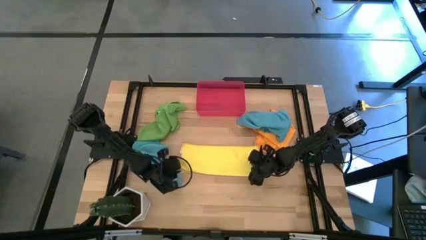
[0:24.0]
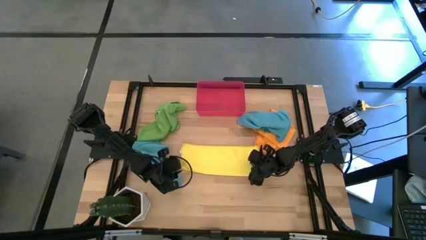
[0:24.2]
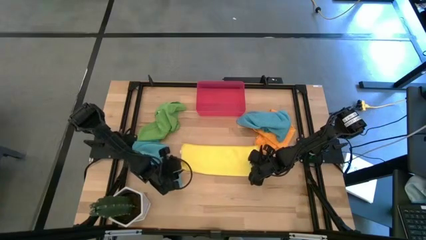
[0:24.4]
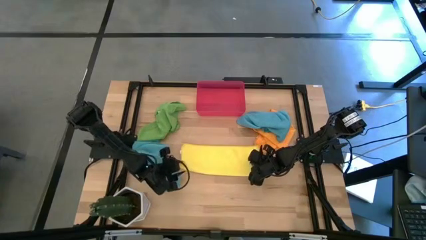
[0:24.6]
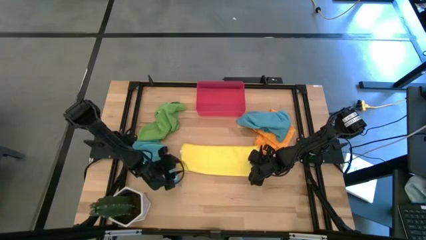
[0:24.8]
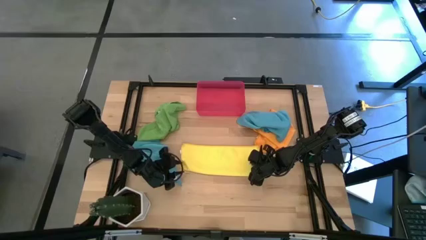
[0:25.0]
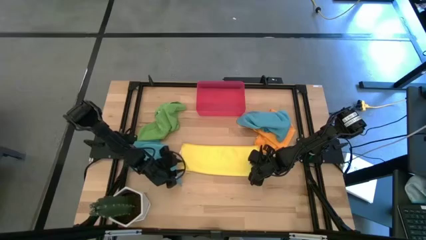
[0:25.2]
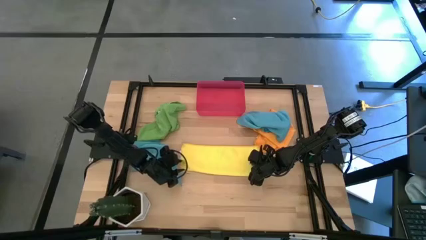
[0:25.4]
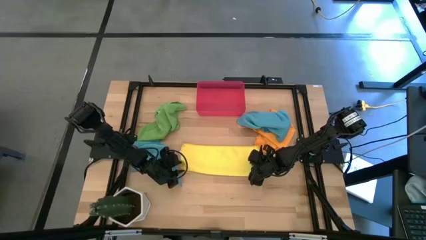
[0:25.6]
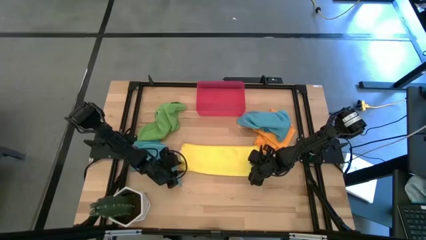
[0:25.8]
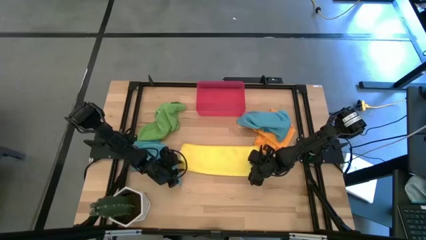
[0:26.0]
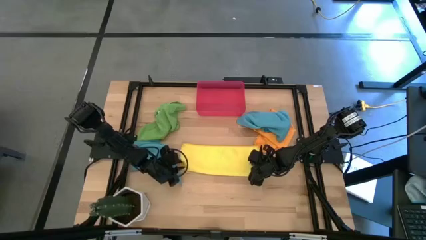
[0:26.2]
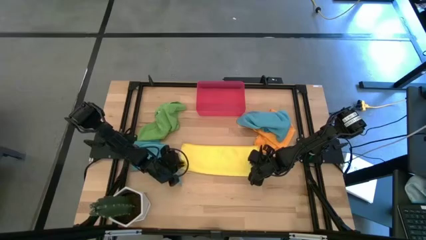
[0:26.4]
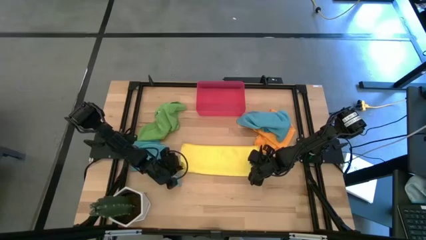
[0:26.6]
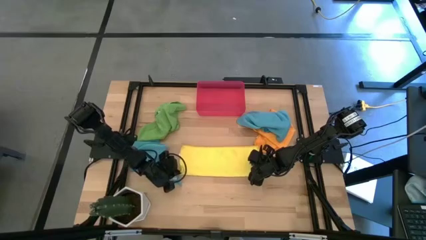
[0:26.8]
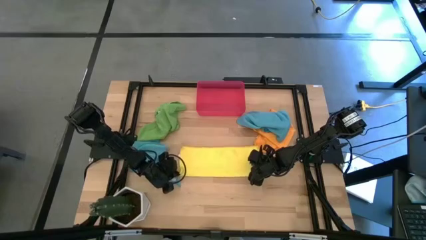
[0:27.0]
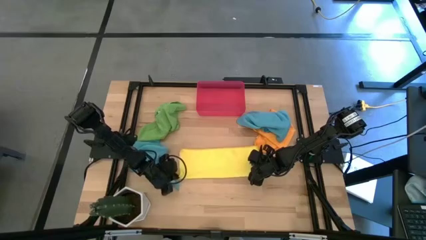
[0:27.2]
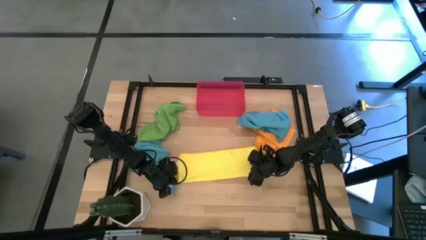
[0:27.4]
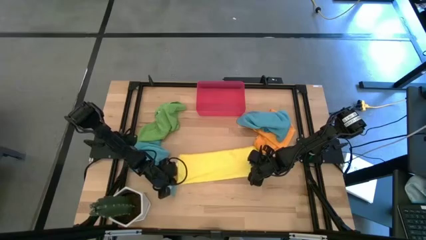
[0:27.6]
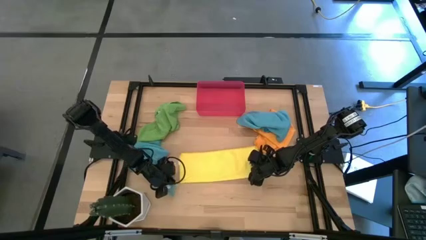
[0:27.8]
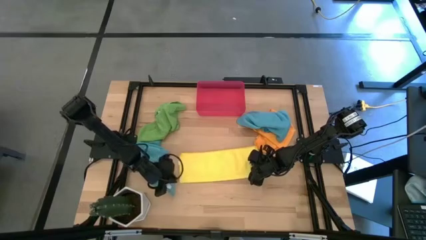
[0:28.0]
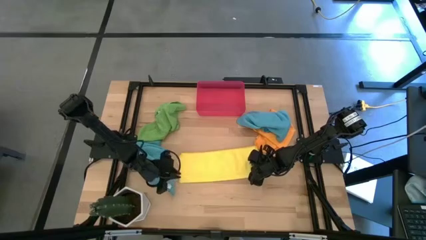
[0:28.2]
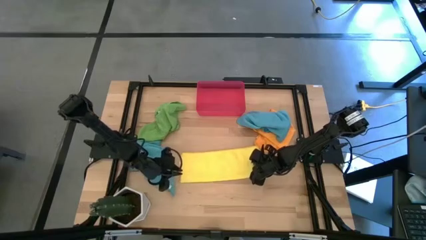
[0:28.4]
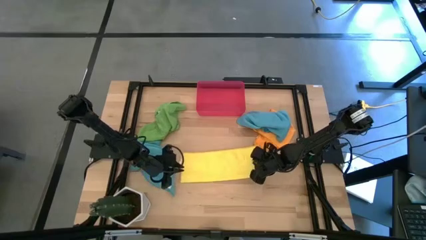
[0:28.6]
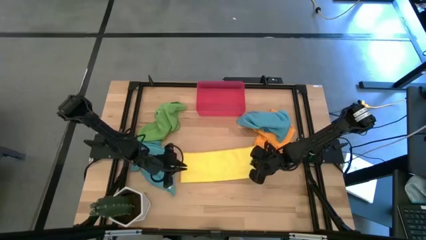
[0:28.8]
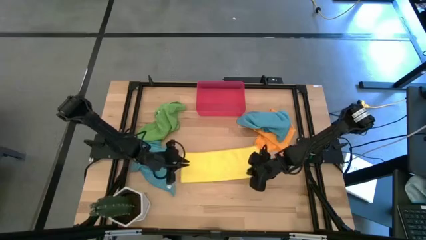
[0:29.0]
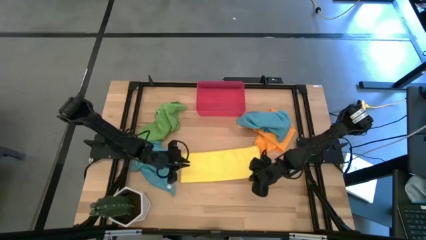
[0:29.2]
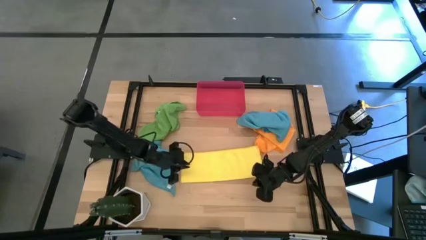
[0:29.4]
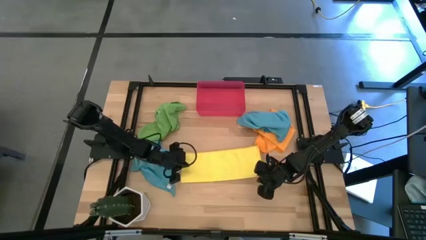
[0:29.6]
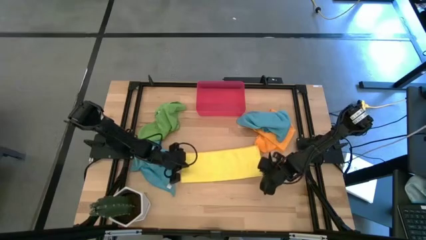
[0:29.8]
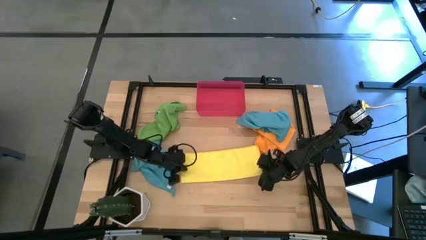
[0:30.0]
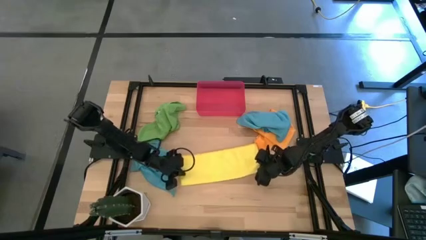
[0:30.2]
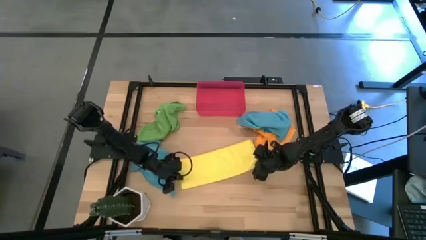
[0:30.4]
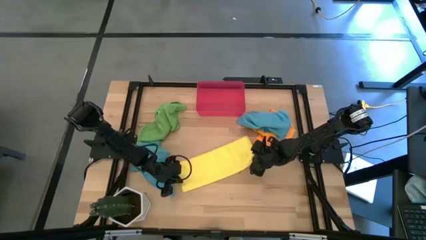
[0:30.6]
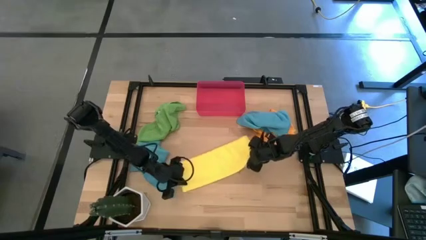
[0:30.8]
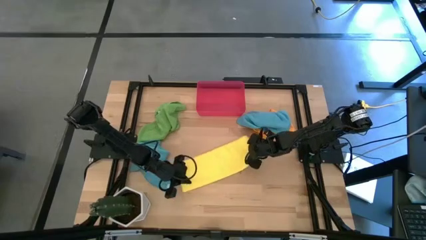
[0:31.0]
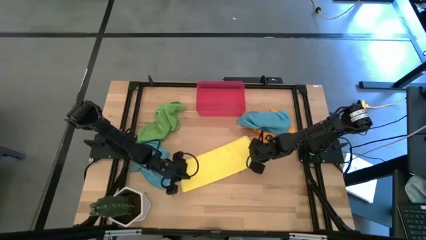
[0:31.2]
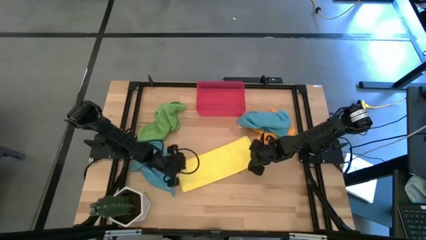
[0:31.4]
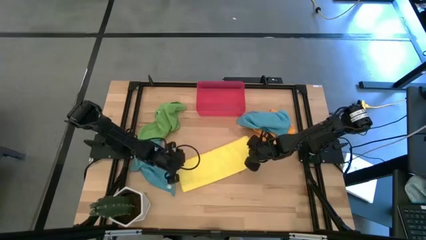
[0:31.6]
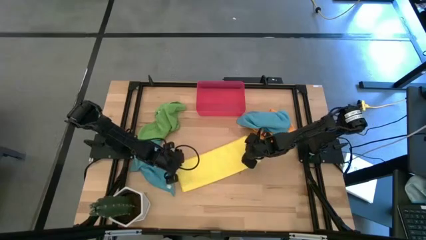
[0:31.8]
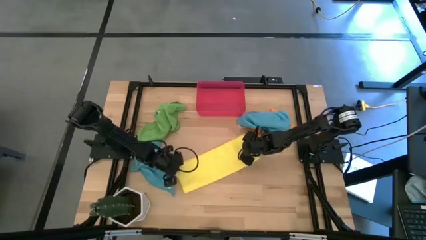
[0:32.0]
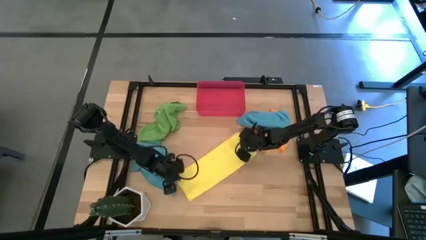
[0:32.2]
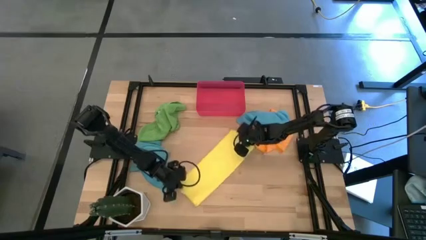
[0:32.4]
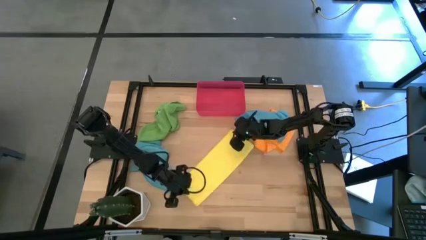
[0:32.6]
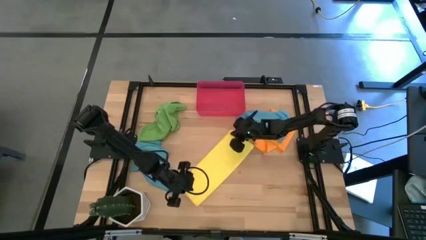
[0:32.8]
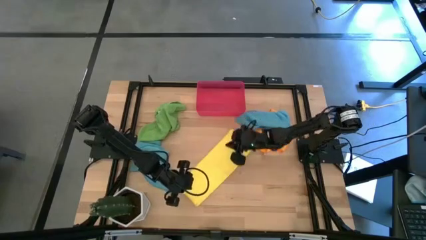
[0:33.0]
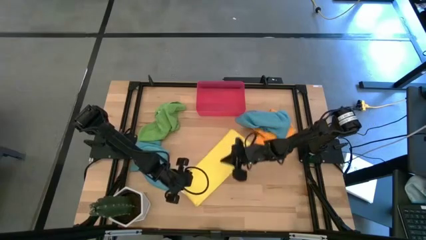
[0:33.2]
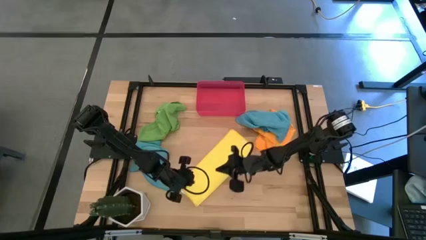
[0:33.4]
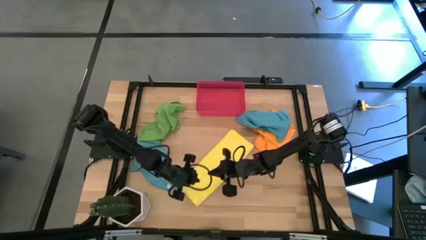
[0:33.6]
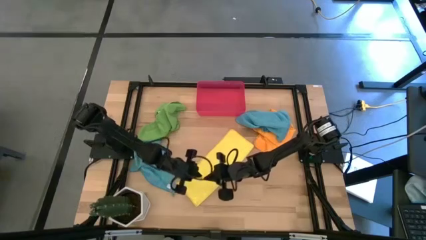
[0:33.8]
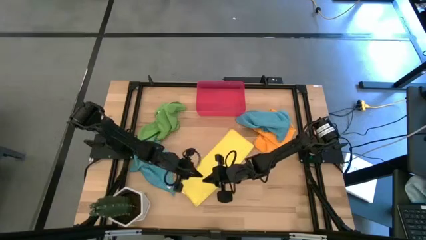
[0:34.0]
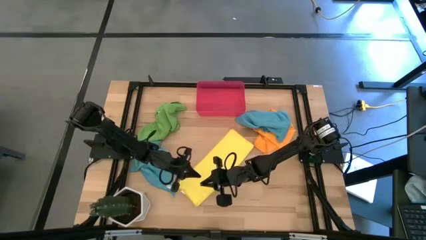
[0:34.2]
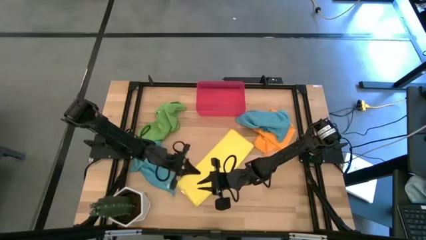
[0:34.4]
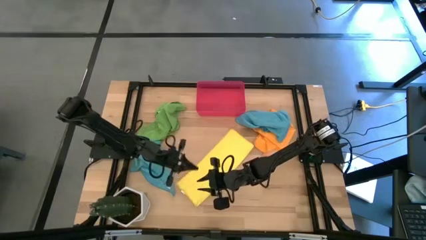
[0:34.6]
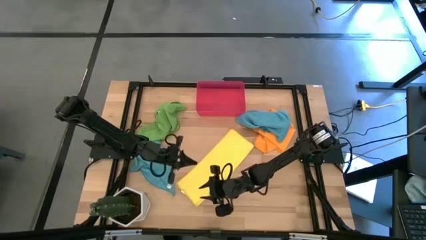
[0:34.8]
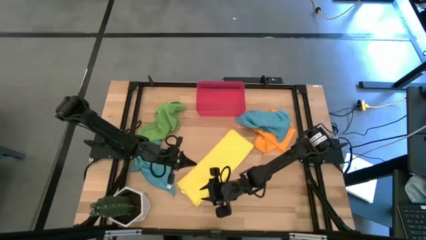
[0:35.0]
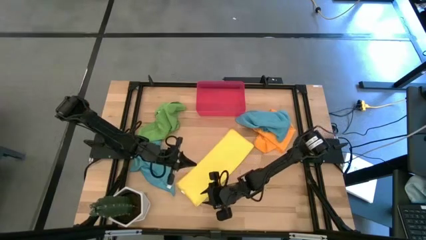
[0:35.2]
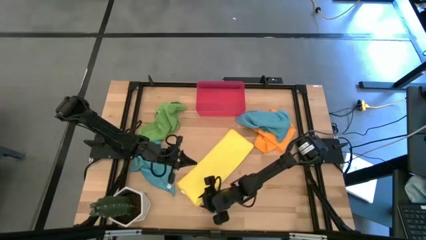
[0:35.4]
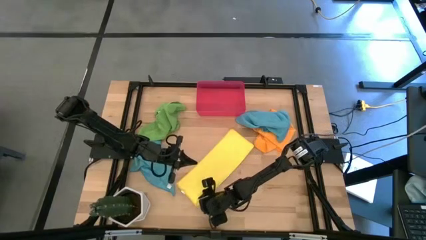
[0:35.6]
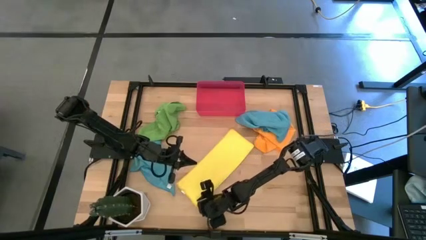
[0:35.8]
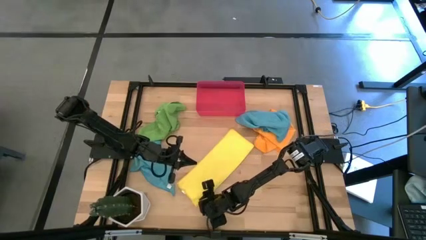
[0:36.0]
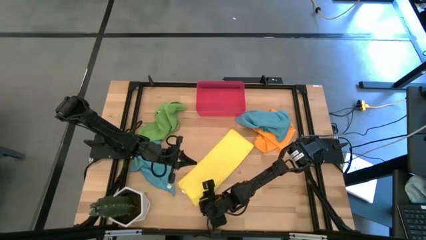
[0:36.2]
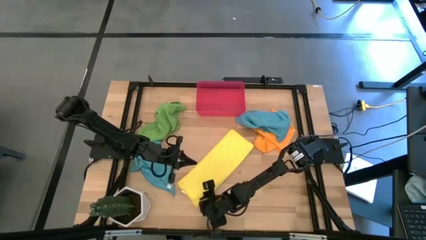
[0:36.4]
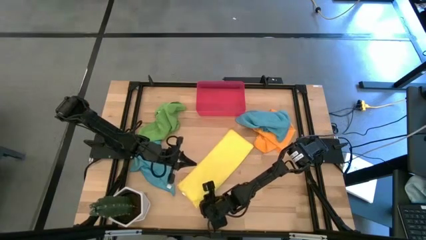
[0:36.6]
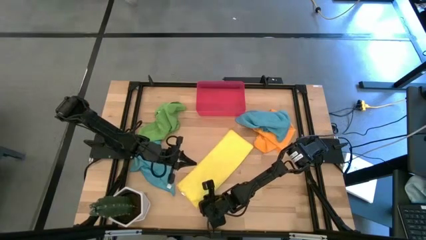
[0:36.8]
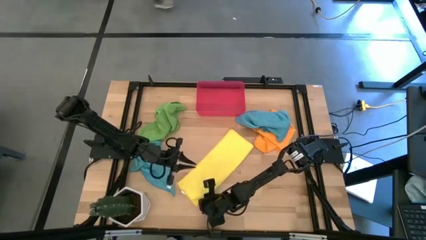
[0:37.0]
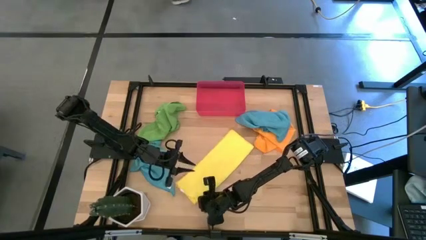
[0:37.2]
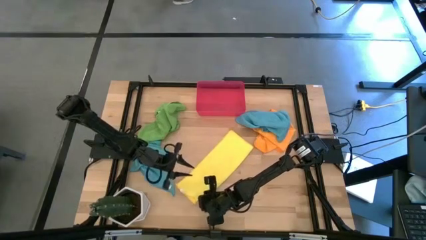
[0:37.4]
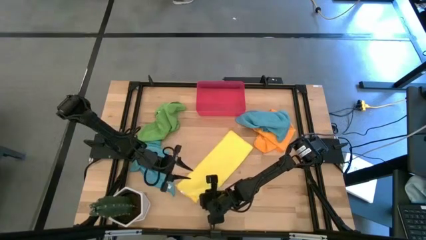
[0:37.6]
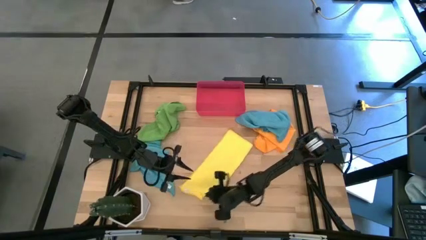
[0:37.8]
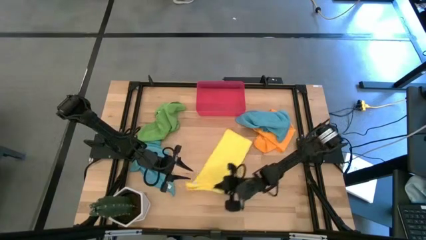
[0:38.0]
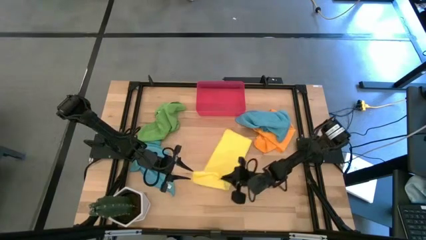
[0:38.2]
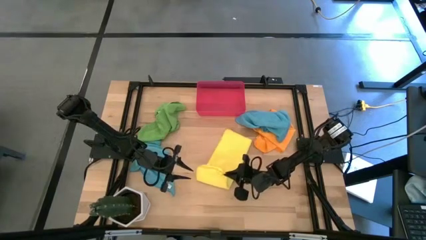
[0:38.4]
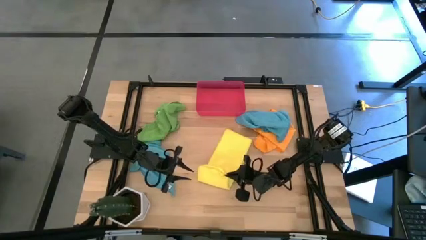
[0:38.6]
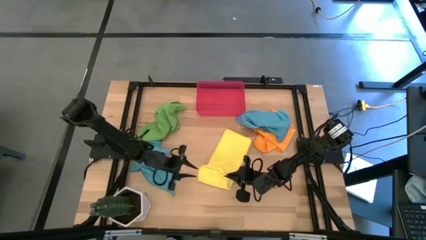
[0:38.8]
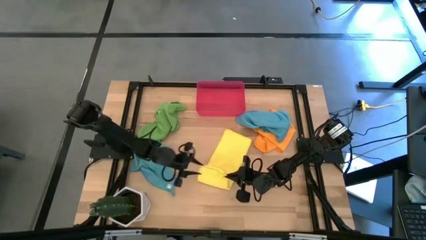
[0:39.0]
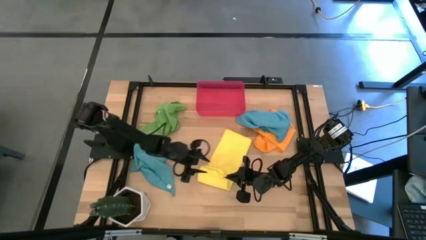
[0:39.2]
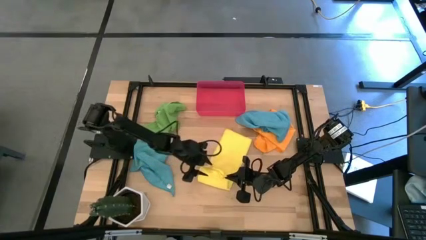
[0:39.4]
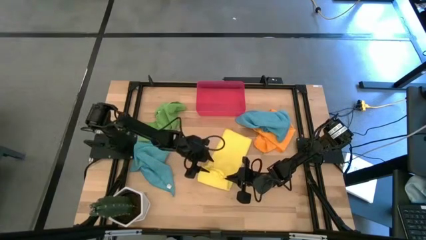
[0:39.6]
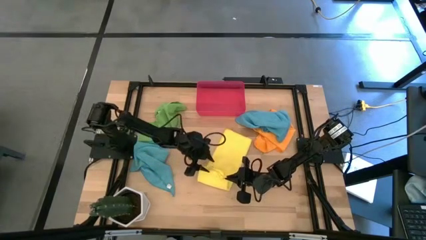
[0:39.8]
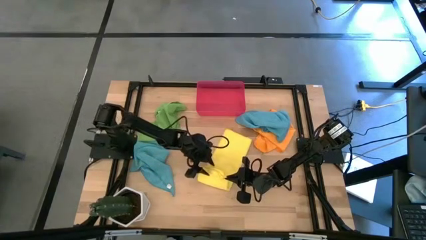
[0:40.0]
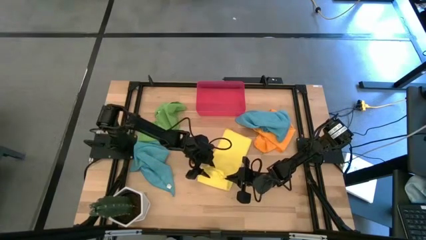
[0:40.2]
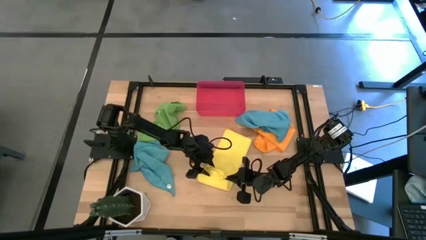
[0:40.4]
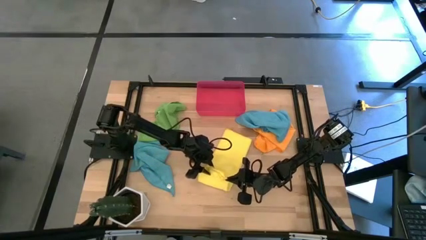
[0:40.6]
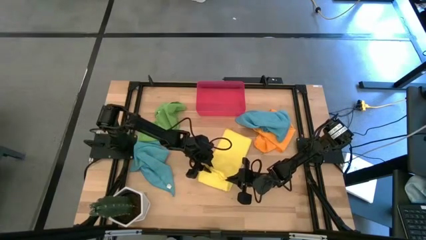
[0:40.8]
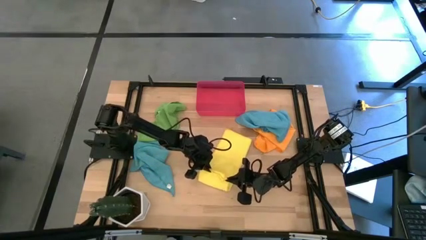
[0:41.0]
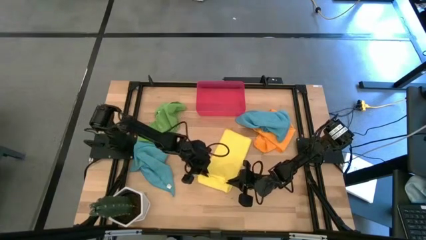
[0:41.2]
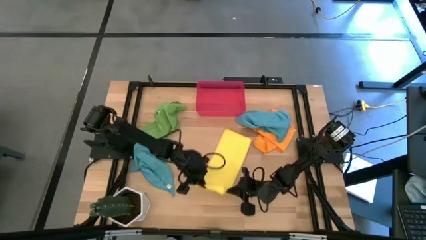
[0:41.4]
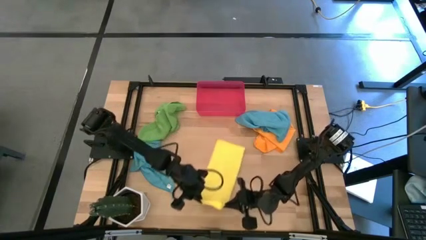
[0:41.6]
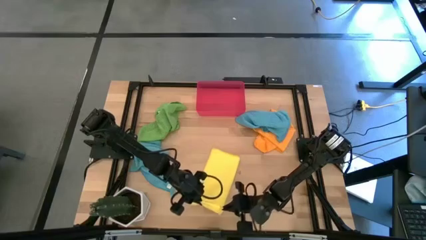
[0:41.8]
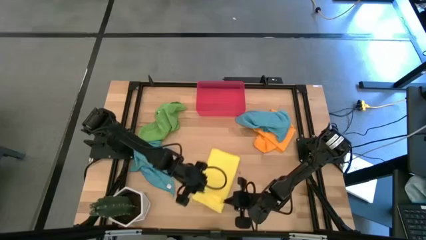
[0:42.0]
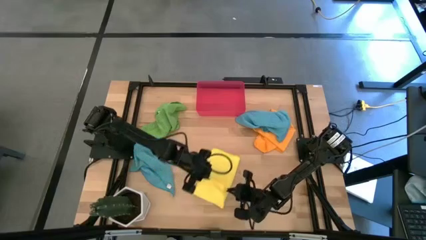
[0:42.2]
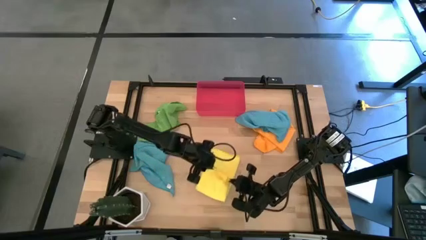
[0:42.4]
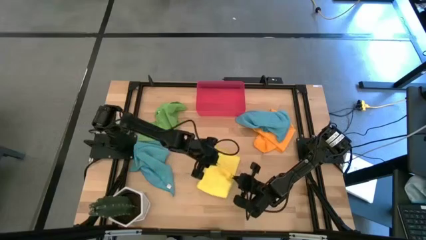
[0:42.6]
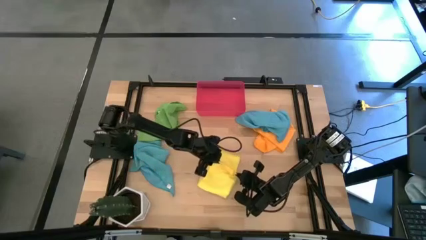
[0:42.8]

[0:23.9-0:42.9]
Task: Roll microfiber towels into tight, uniform cylinder then place into a basket
Roll the yellow microfiber cloth
